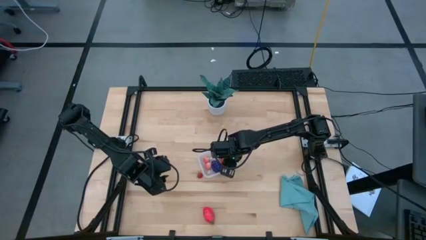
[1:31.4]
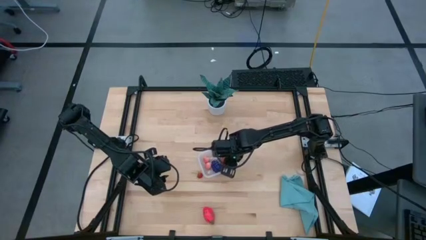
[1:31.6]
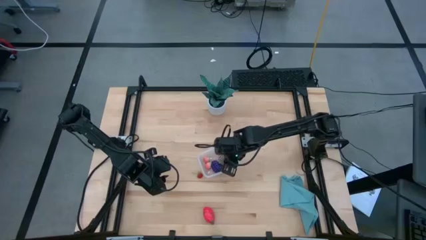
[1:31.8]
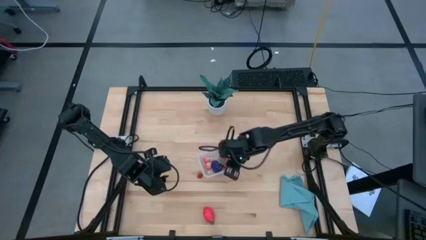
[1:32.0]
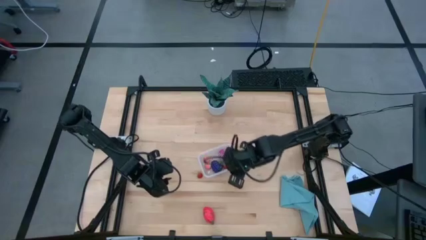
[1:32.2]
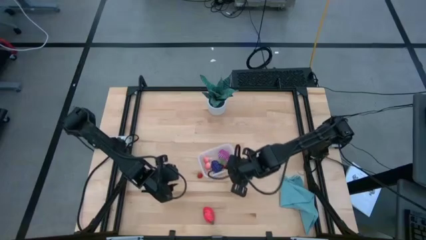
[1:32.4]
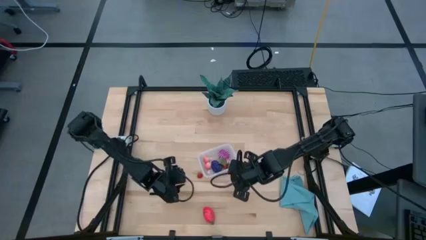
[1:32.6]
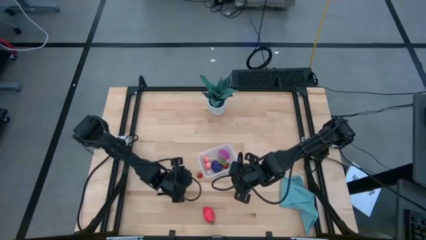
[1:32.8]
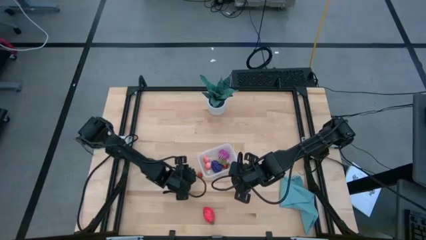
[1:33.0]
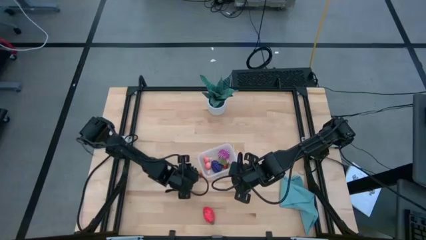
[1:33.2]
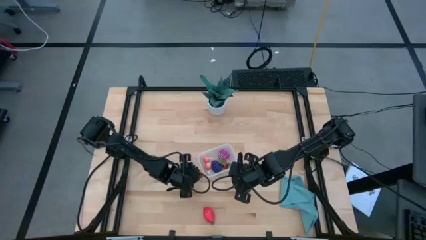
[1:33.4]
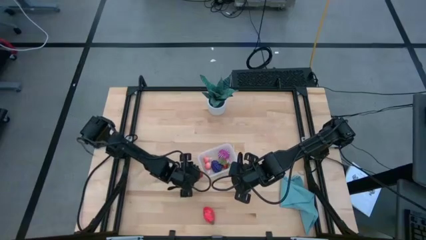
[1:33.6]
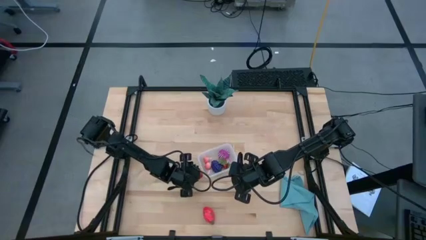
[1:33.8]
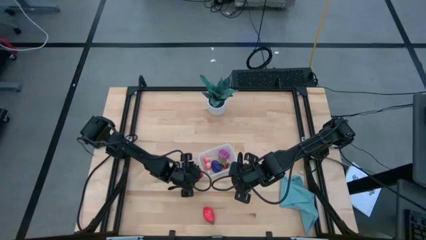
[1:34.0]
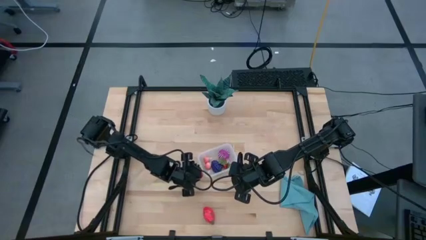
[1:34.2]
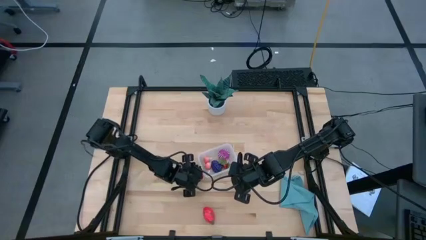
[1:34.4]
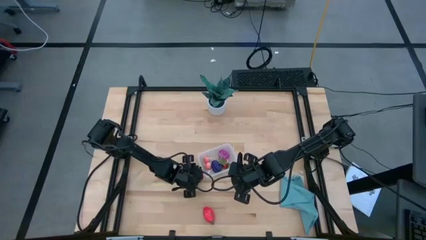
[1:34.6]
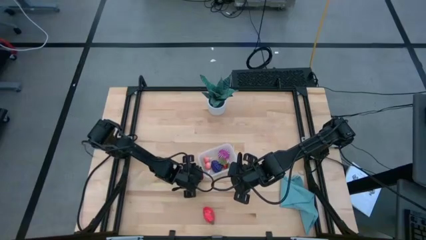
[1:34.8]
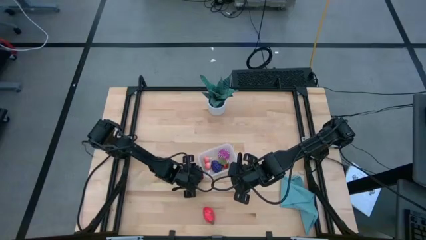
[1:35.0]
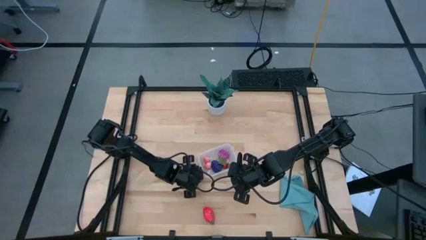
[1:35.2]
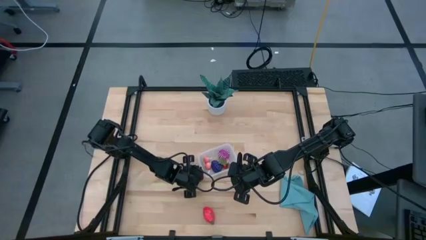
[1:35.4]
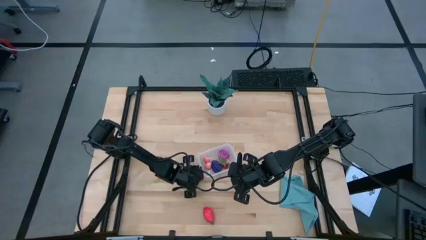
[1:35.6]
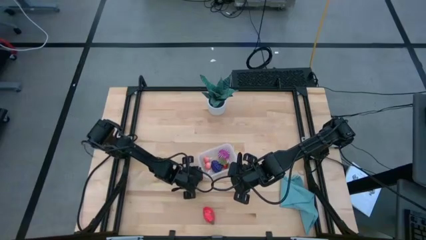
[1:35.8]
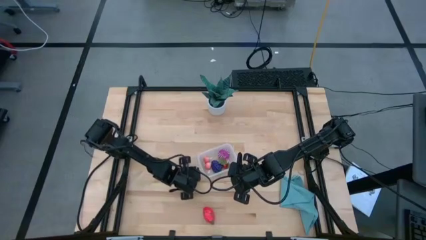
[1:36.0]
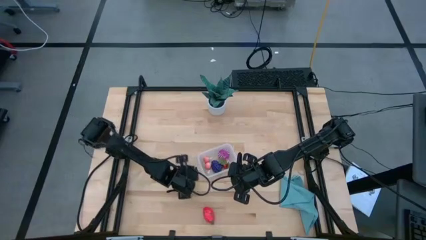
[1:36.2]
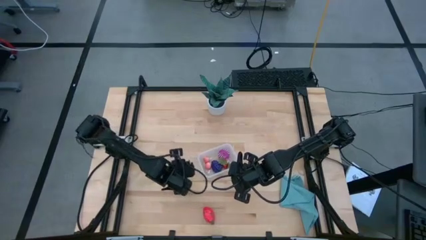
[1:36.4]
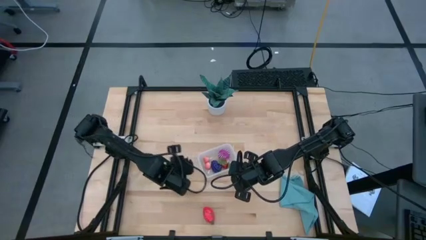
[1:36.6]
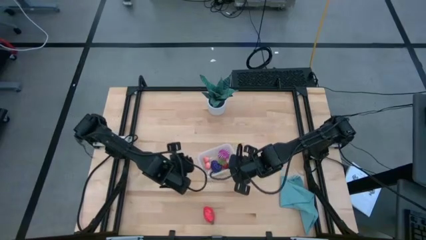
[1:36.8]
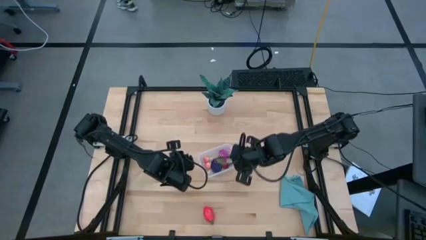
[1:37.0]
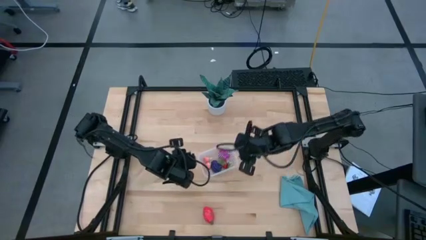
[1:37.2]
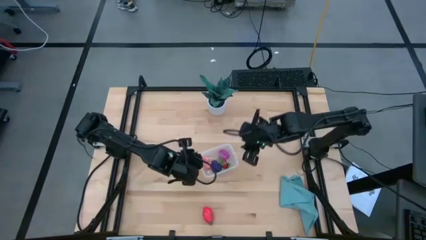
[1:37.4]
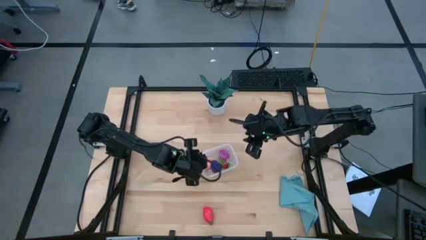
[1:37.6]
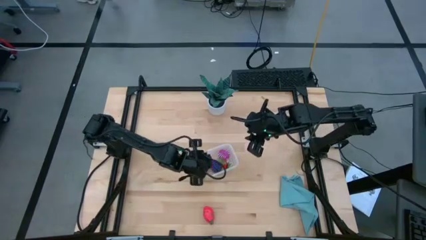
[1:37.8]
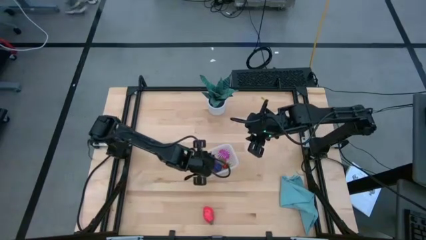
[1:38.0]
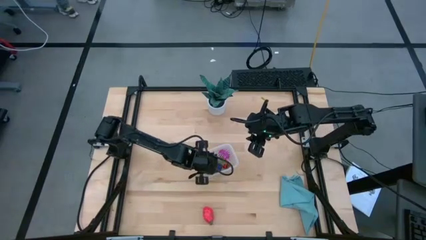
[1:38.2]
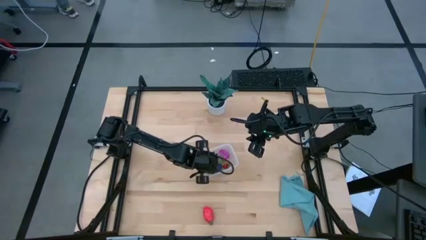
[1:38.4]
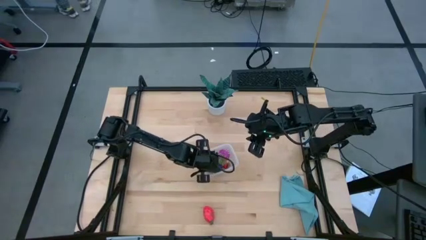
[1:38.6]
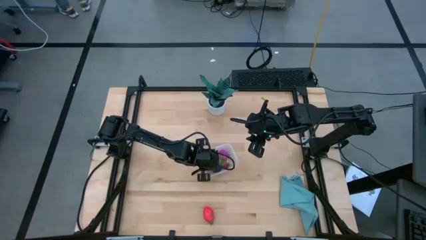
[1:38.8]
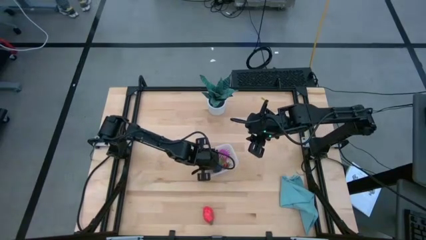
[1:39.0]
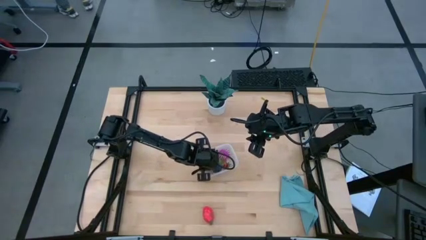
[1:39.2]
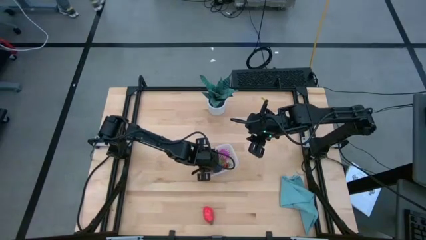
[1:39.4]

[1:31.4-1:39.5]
Task: Pick and placing Produce into tupperware
Put the strawberry into the transparent bin

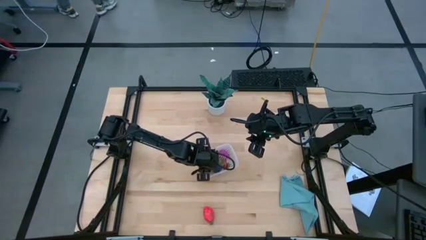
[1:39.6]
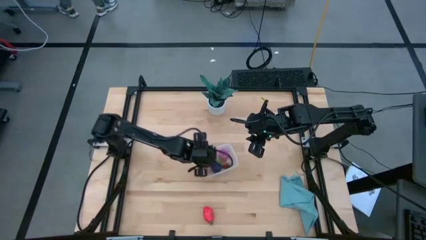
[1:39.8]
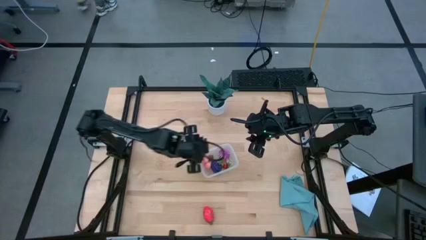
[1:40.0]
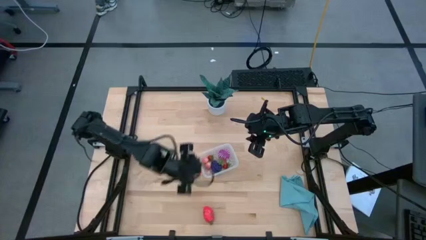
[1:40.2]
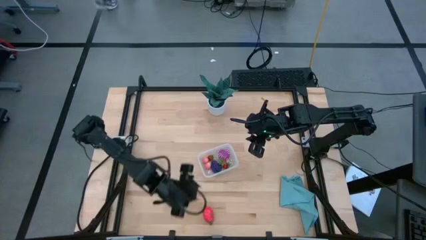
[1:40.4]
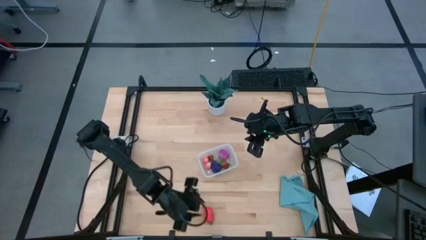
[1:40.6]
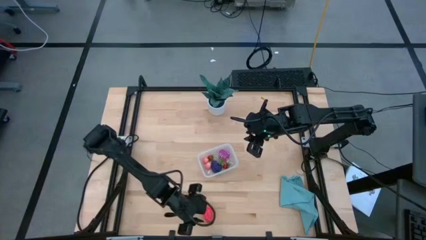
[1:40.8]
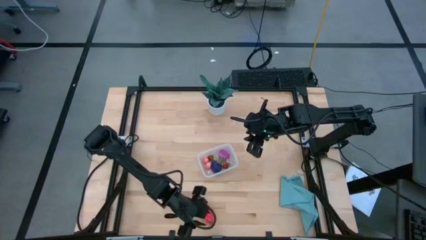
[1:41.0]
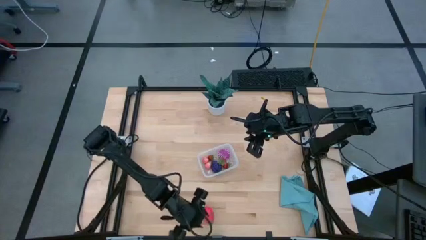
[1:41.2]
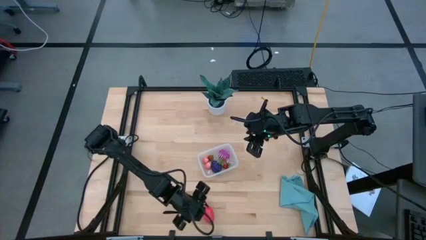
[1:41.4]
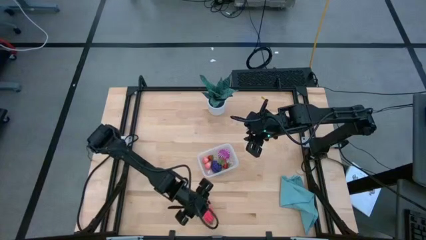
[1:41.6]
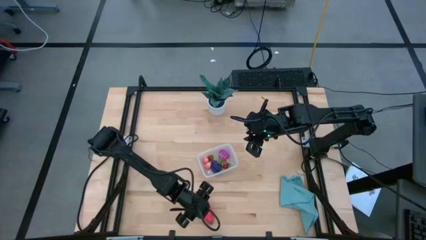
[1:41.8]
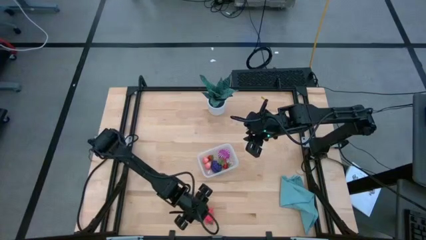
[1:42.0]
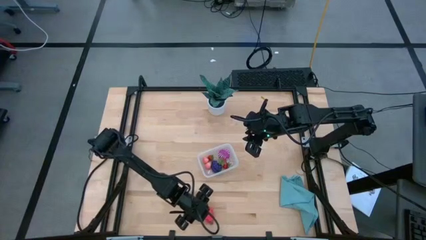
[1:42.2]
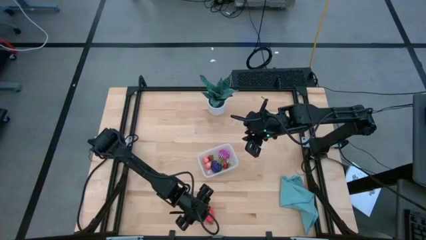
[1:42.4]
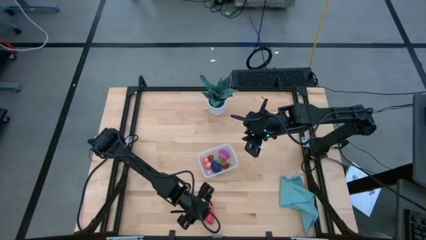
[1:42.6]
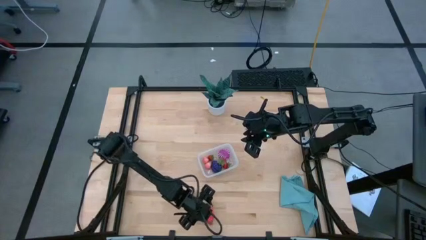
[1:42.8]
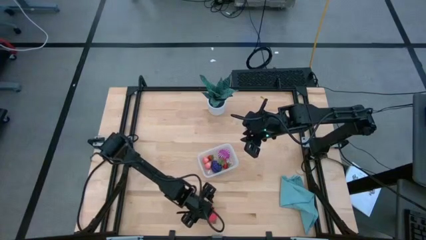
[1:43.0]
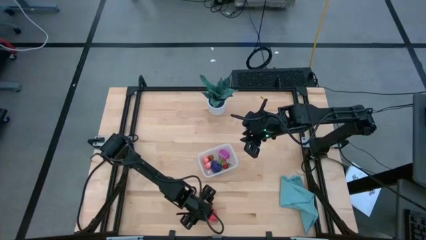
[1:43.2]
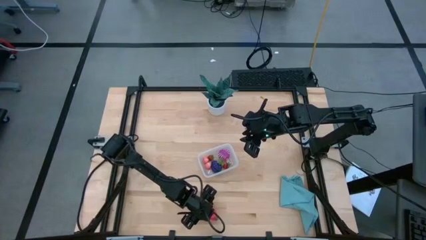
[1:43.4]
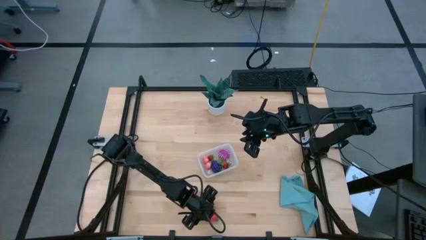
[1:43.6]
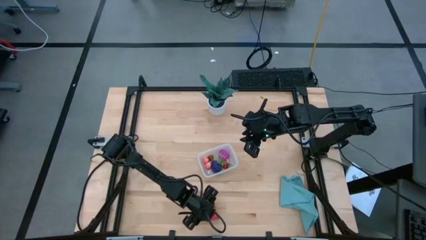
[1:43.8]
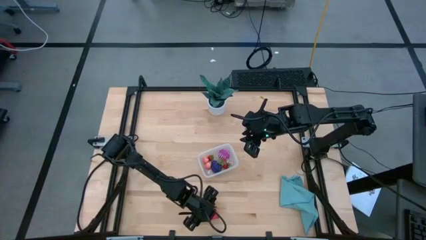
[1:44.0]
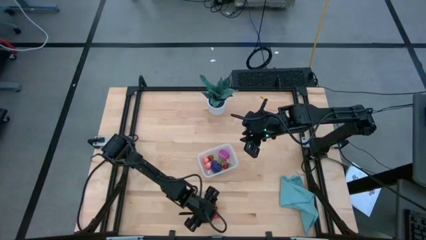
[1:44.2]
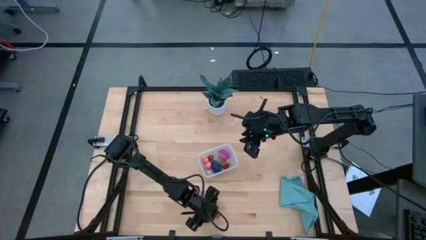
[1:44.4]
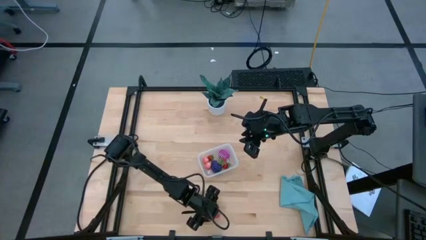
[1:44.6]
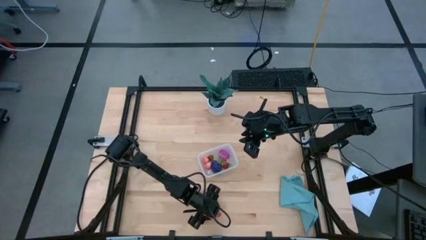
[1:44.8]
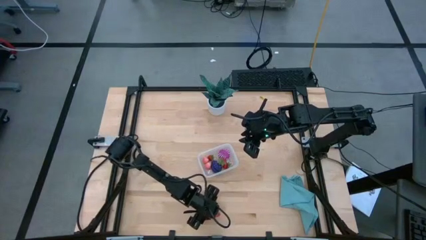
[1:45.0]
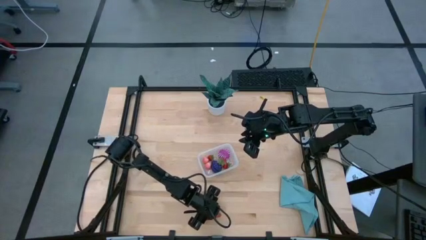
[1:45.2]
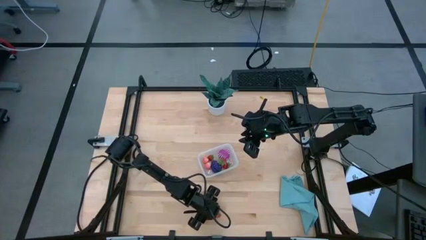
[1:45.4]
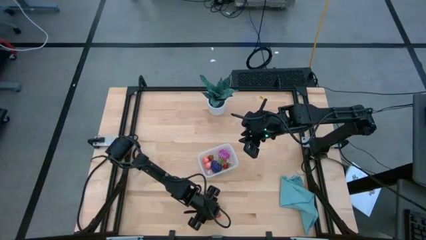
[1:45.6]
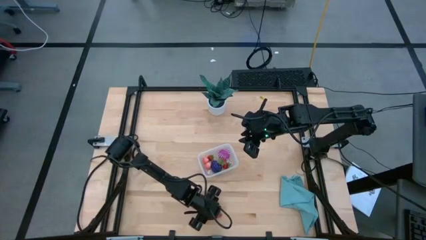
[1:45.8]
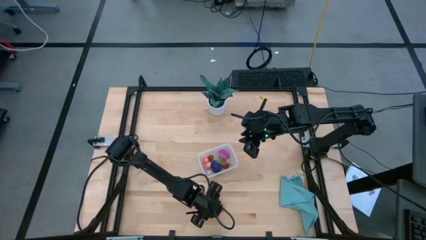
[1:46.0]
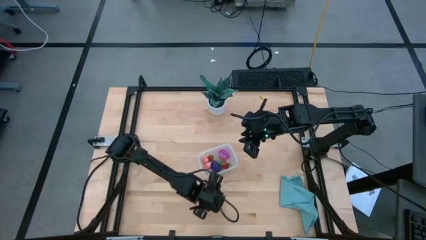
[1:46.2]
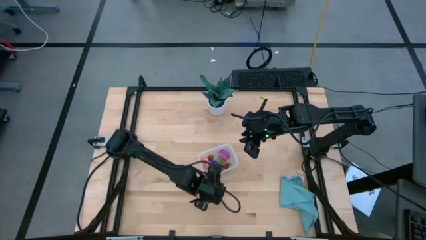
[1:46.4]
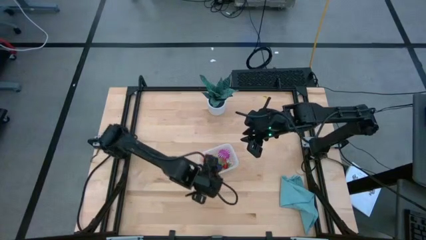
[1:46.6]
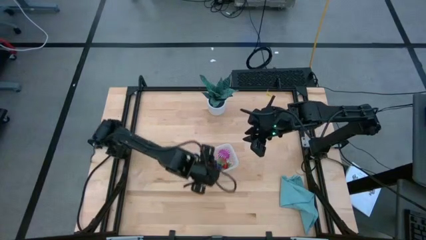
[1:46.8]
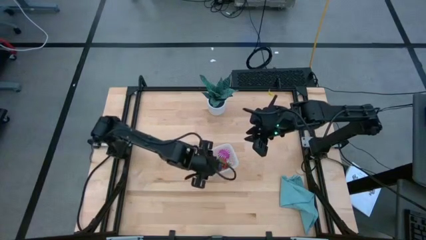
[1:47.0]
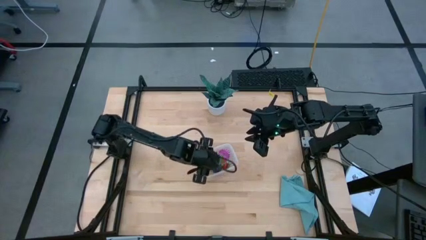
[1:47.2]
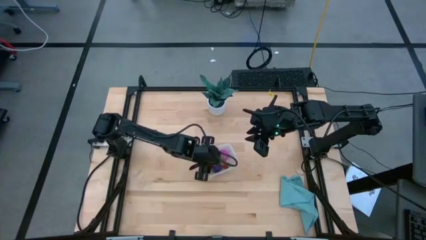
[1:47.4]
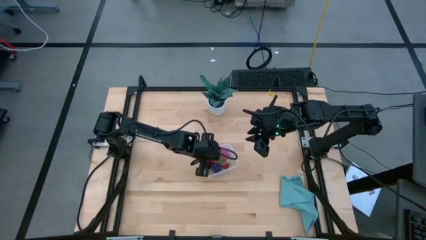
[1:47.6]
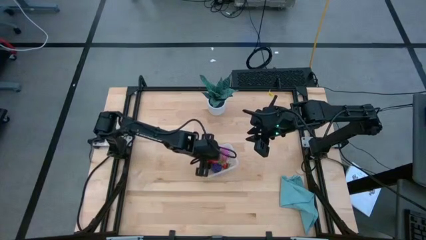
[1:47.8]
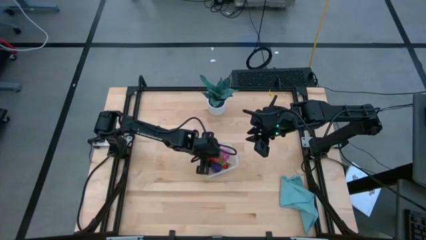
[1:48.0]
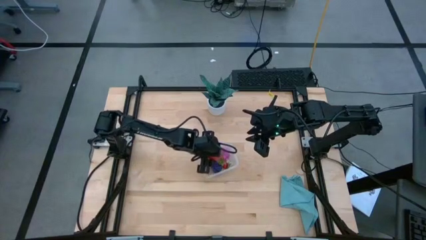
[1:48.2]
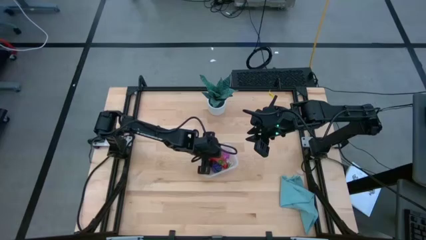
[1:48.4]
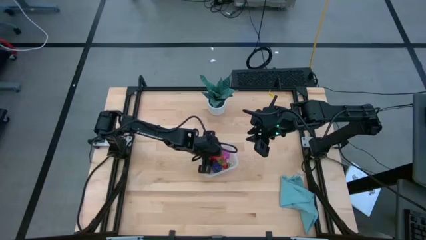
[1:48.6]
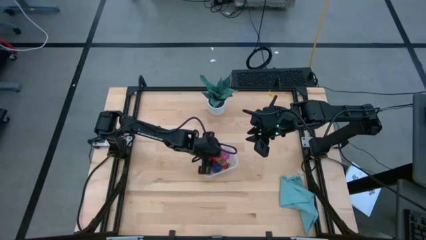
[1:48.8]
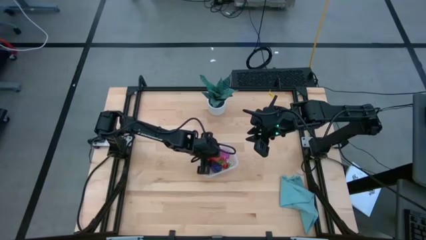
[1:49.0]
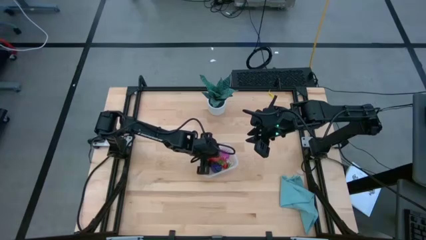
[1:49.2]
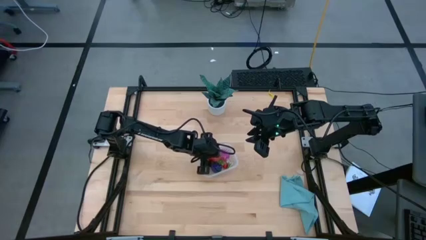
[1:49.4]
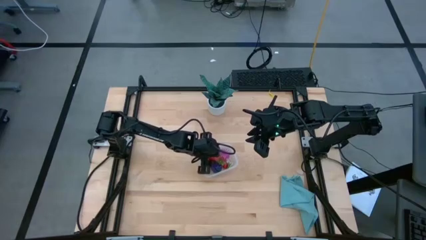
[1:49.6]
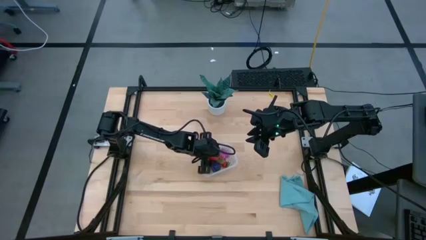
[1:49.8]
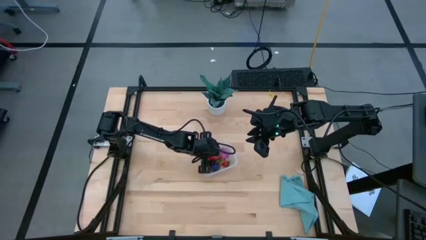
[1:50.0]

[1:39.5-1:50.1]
Put the dragon fruit into the transparent bin
